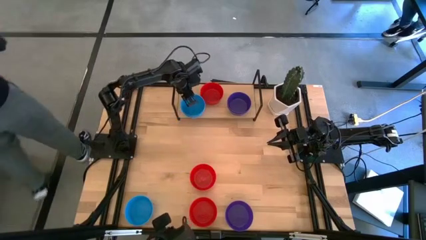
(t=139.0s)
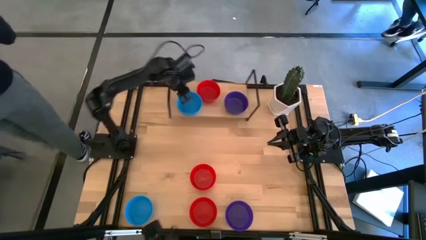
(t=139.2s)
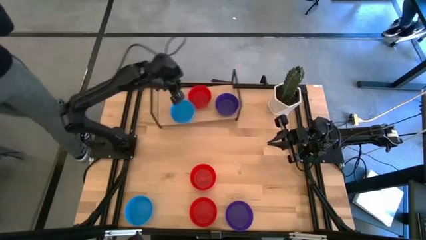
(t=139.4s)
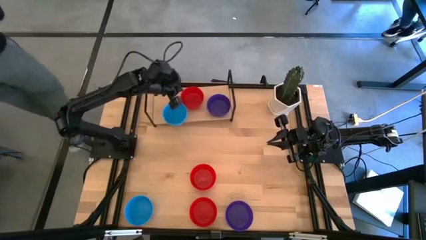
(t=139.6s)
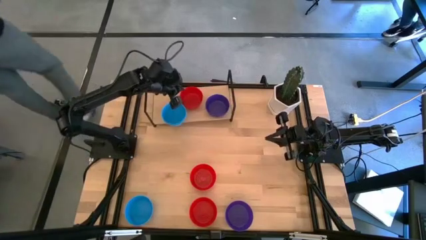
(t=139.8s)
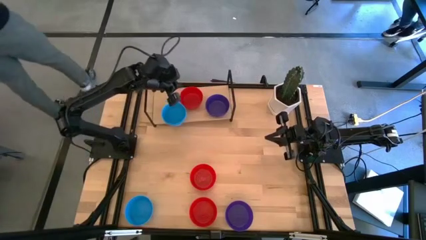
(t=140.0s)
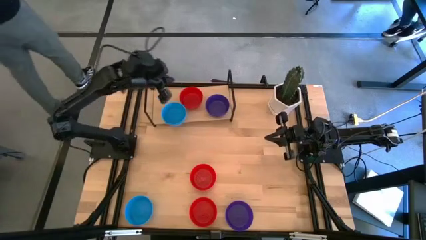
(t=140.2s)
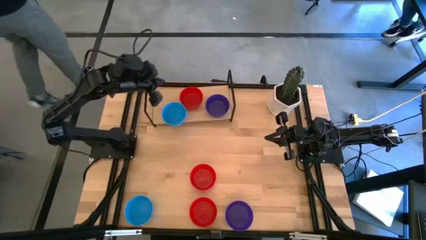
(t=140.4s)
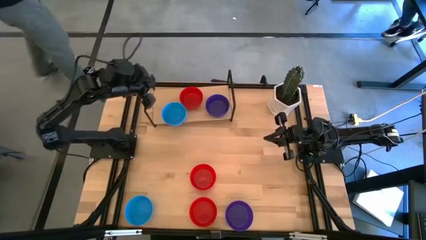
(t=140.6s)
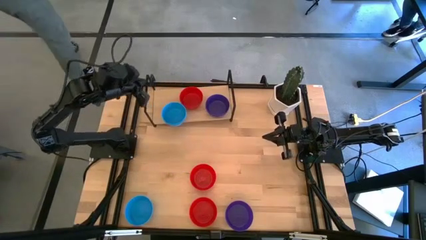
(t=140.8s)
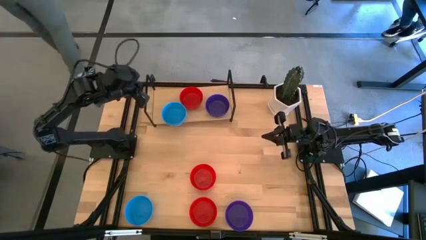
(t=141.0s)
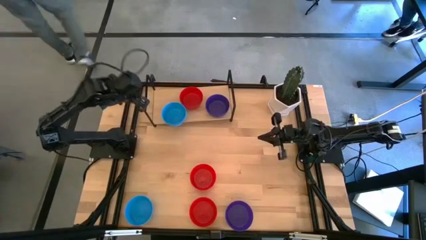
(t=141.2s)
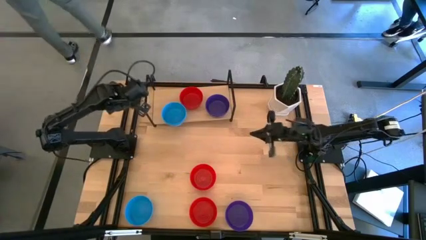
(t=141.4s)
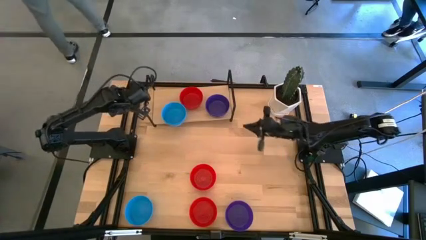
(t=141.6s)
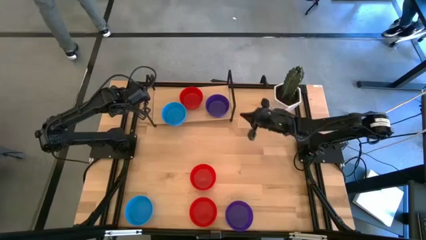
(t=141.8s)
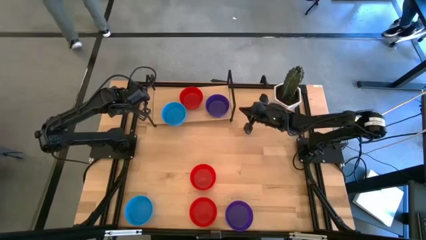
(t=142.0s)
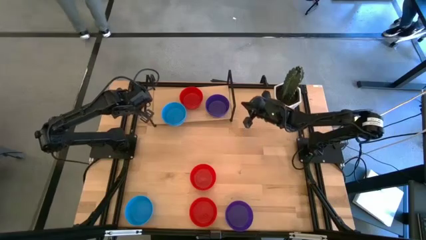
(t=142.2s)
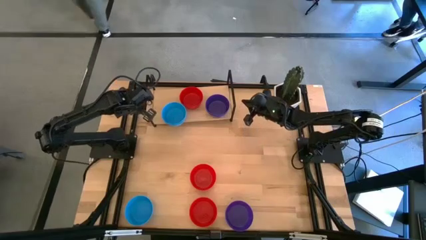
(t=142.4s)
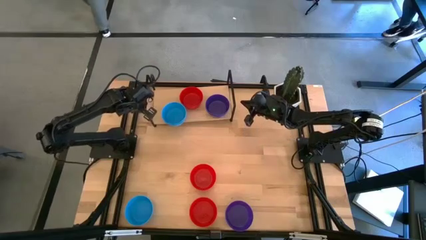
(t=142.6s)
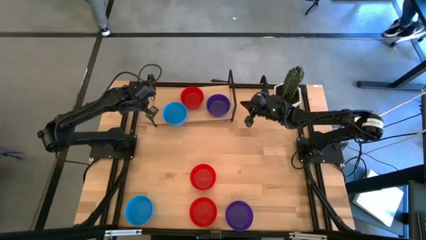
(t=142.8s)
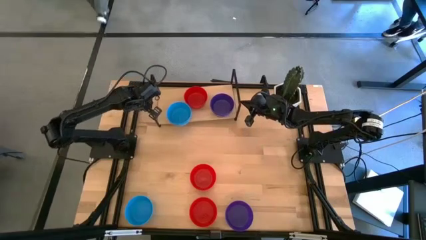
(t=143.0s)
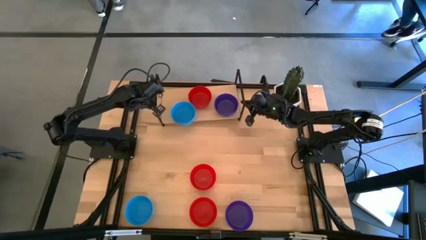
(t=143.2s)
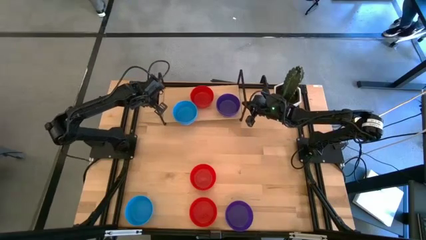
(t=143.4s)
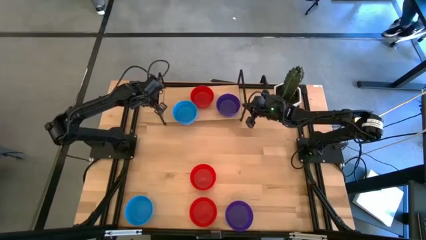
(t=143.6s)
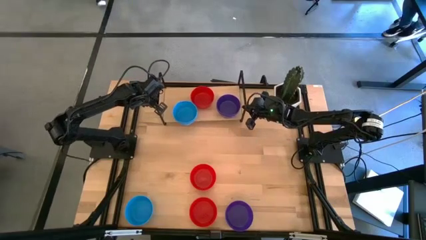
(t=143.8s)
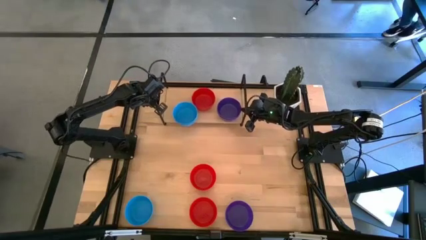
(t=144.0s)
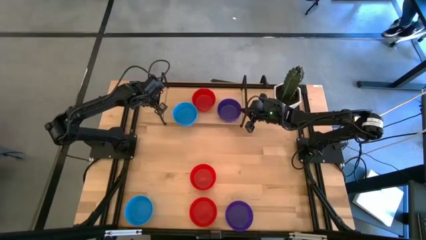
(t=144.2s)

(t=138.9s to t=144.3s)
Task: Pick & Place Mini bowls
Adjust the shelf

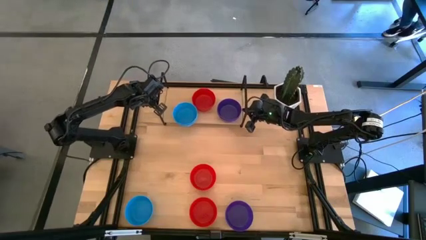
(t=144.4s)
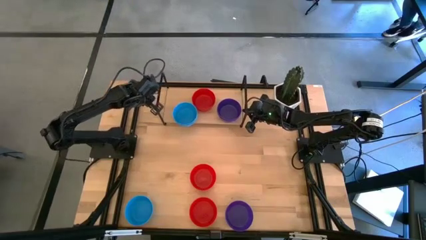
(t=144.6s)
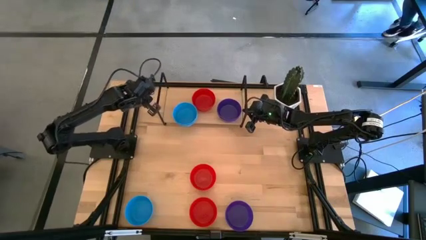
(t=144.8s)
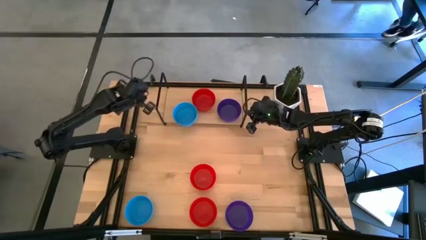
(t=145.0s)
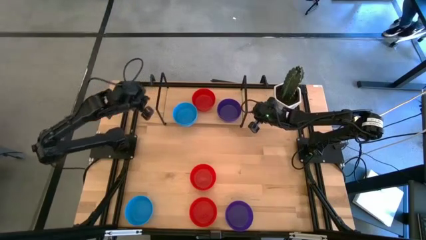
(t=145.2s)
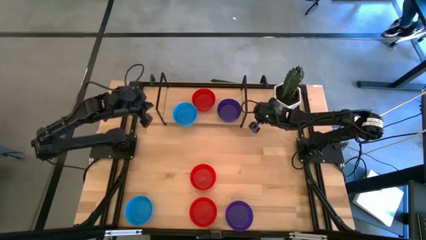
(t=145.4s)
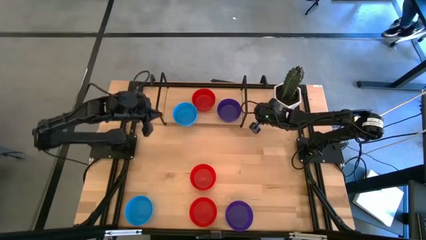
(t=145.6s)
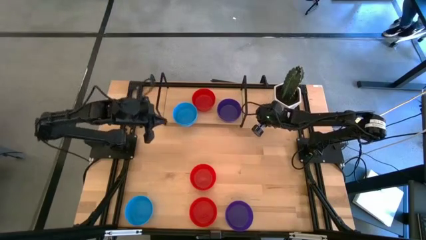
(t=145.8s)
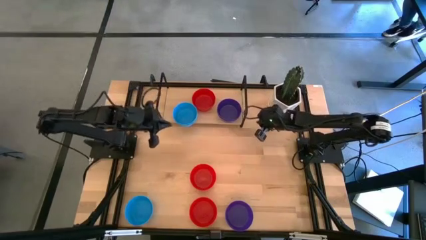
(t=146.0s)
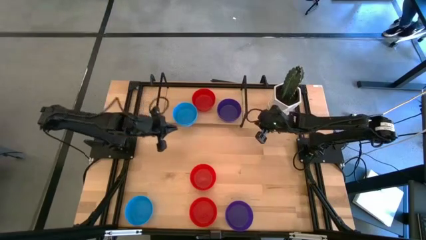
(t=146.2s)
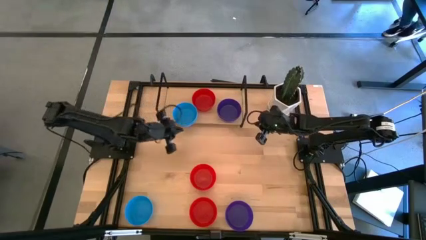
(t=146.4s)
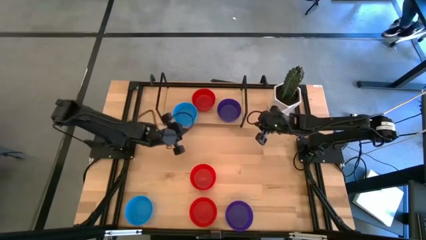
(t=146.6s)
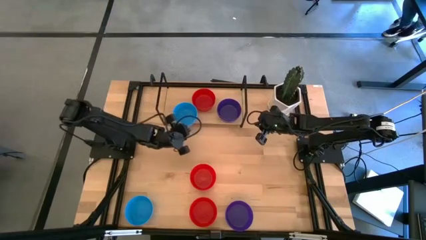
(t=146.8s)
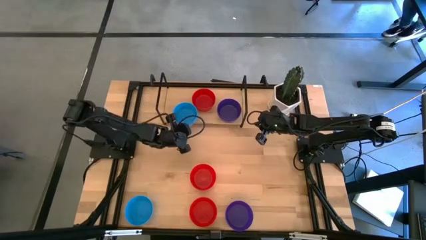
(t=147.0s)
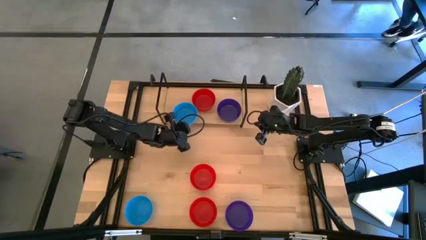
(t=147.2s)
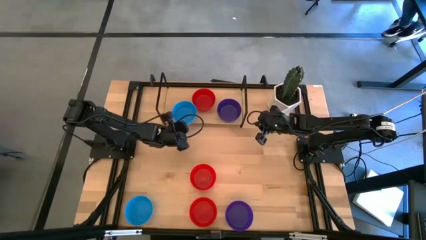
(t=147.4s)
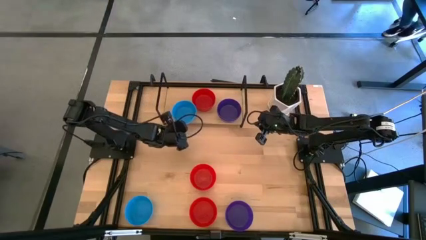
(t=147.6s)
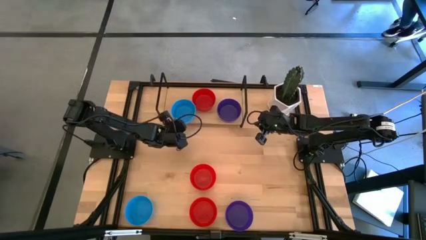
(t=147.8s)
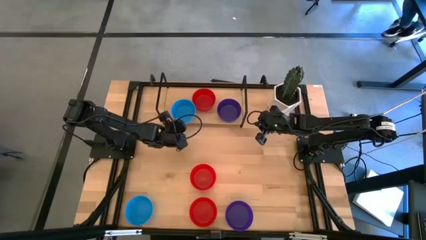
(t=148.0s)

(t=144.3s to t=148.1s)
Adjust the stacked blue bowls on the shelf

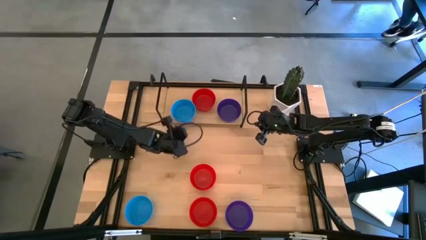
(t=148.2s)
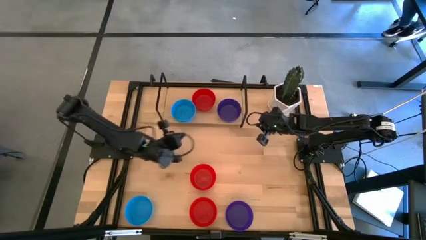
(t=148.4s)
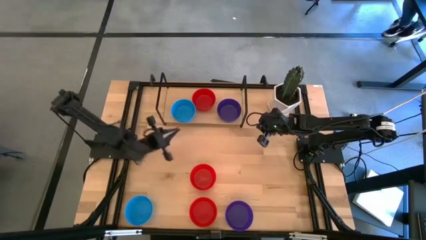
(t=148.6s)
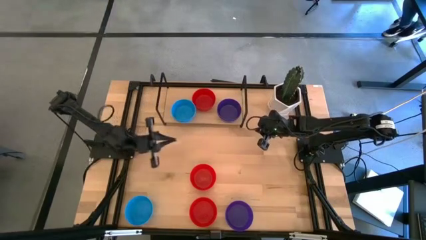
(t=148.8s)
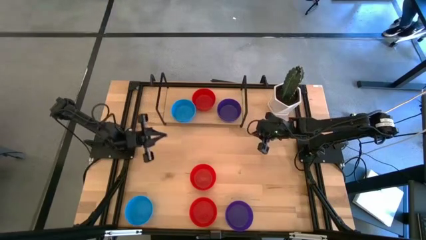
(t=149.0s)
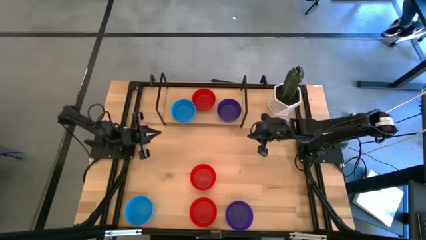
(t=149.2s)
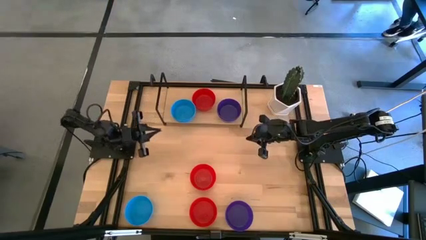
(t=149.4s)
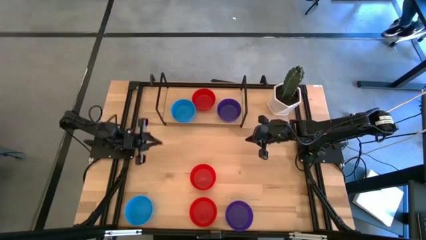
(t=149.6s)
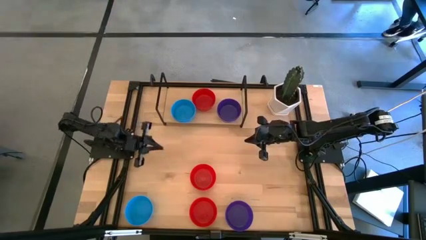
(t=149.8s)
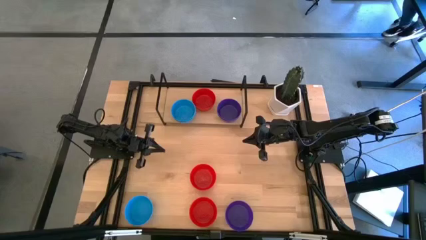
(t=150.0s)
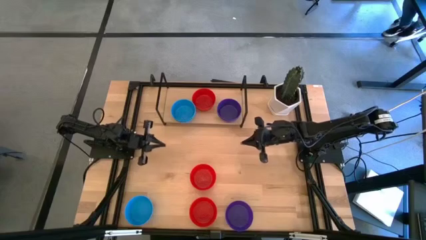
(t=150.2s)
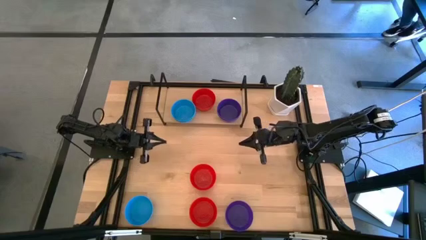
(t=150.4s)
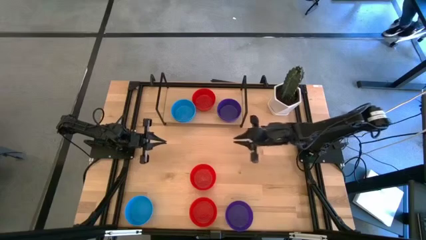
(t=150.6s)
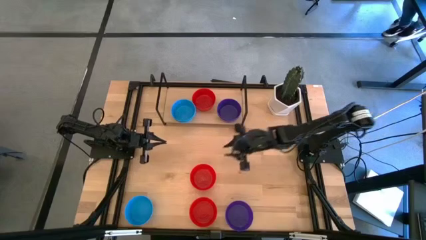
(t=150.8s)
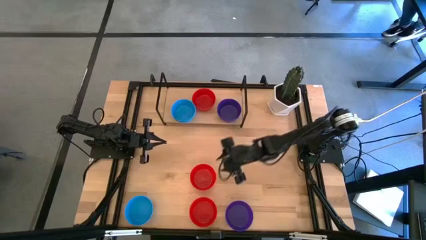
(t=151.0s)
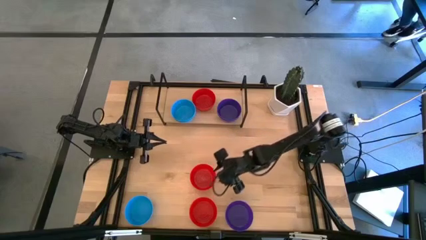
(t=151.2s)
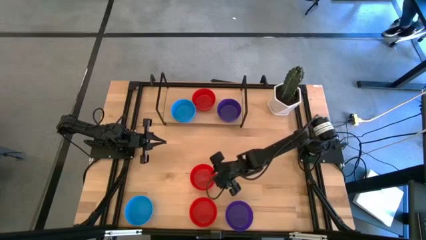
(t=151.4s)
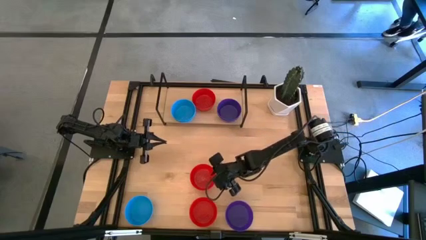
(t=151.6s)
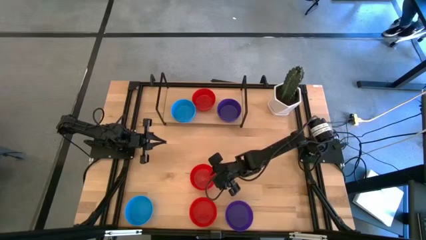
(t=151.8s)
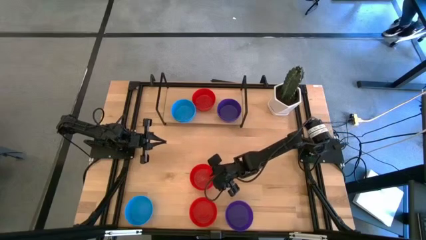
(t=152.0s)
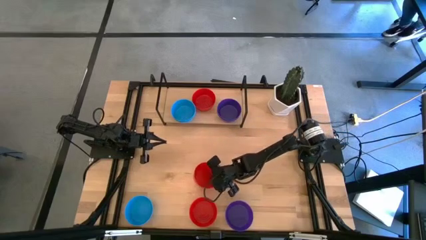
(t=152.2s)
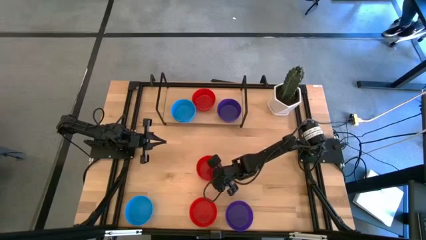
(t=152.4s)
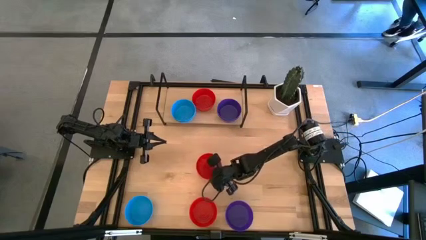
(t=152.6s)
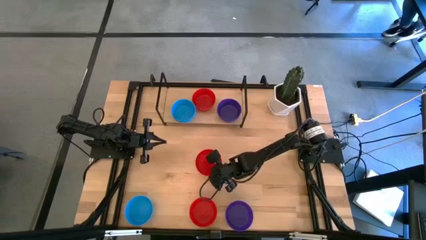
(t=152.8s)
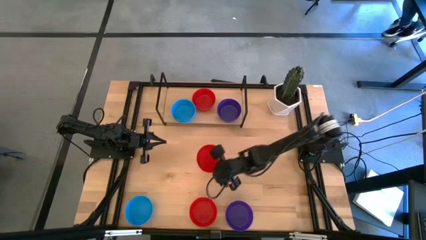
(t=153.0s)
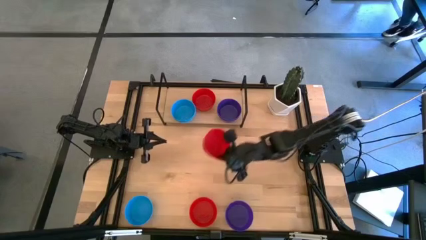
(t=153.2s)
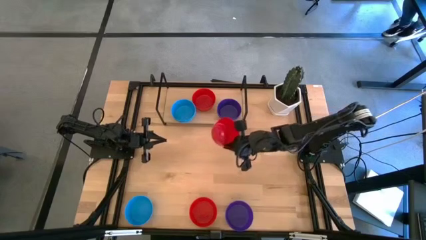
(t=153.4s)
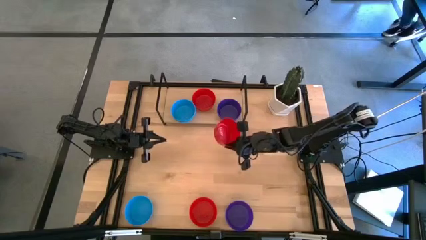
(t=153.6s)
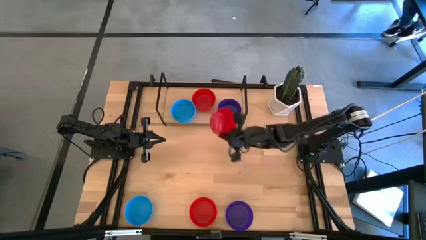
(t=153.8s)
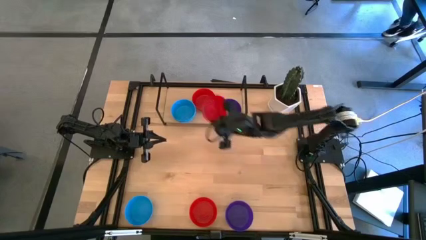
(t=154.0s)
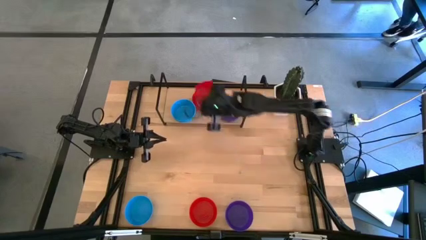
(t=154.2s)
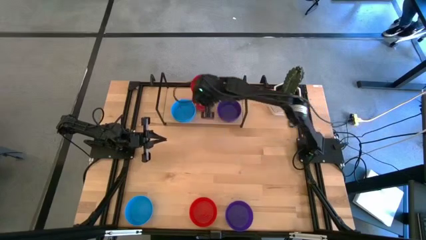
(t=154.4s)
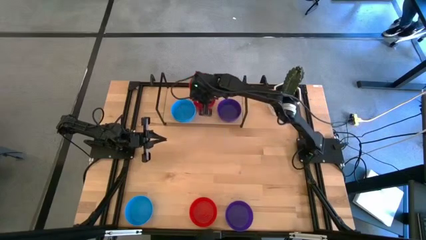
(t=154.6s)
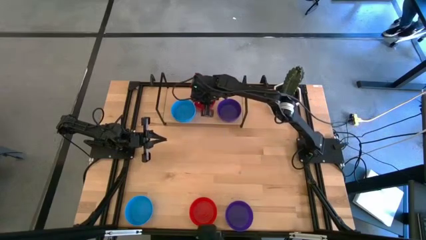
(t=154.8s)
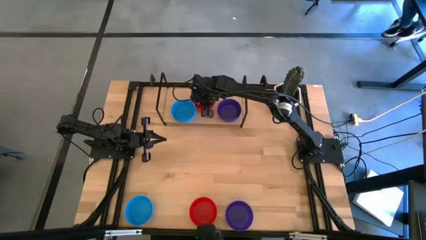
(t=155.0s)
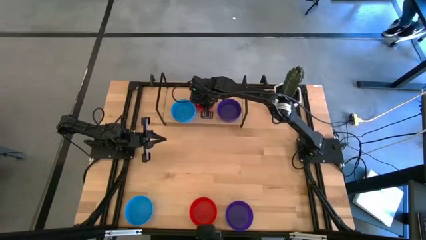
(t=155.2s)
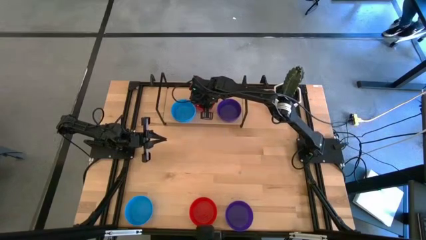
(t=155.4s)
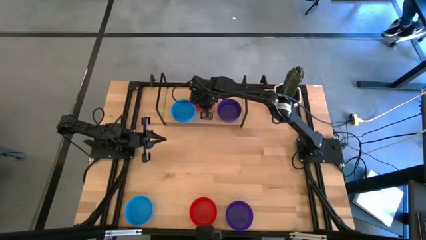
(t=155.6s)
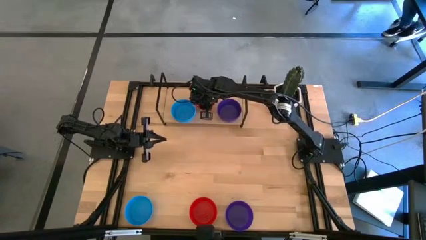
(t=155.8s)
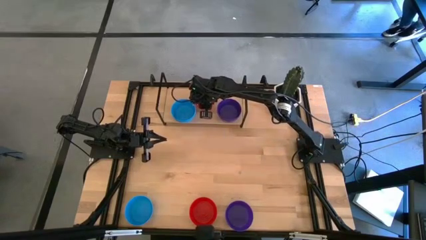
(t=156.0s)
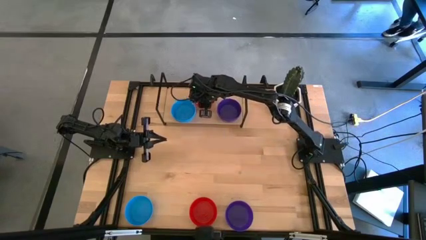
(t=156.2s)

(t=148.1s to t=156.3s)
Stack the red bowl on top of the red bowl on the shelf
